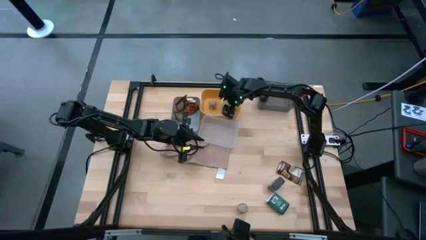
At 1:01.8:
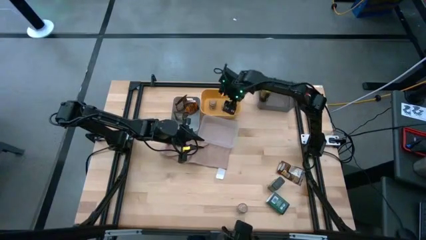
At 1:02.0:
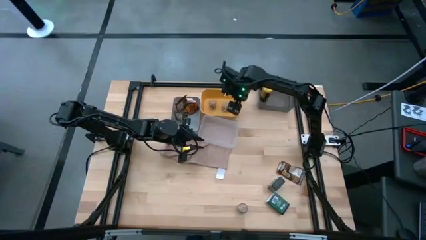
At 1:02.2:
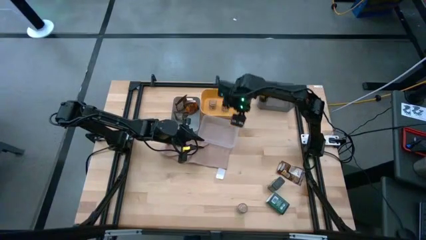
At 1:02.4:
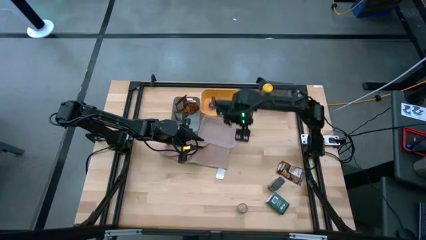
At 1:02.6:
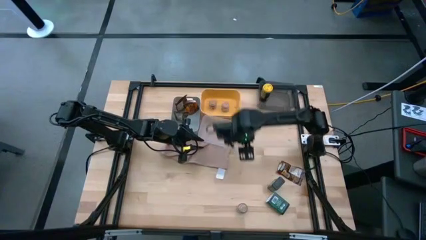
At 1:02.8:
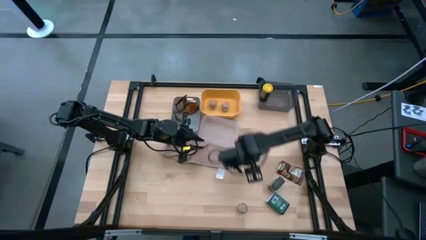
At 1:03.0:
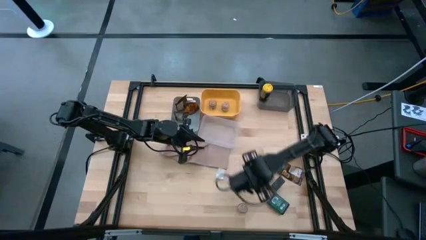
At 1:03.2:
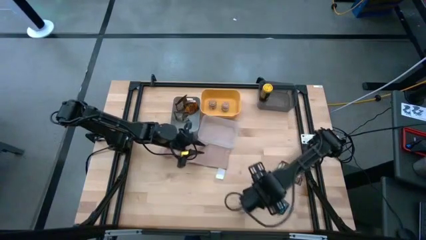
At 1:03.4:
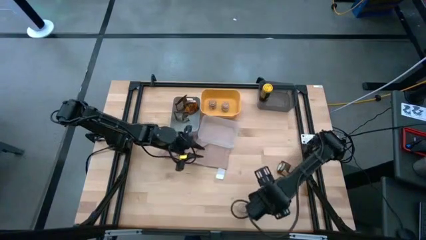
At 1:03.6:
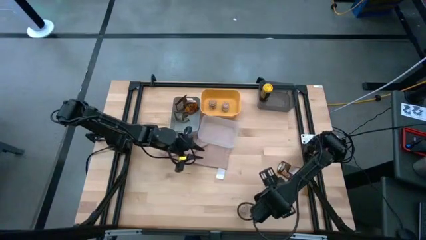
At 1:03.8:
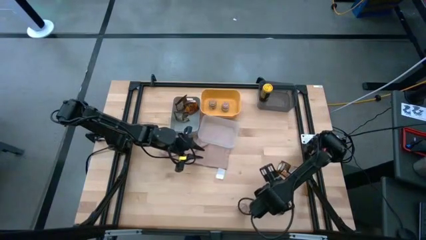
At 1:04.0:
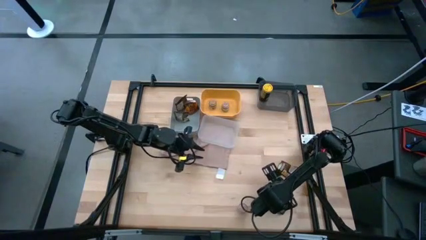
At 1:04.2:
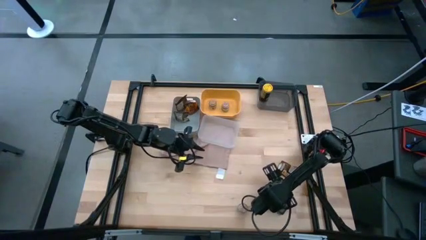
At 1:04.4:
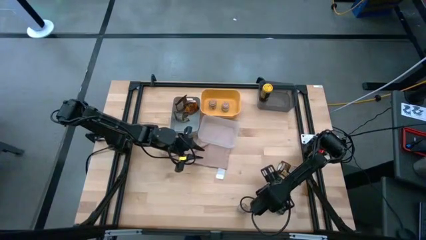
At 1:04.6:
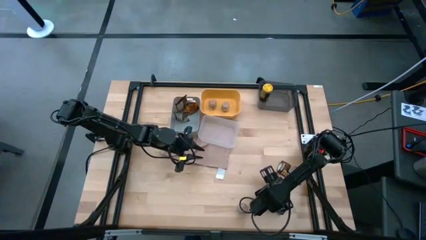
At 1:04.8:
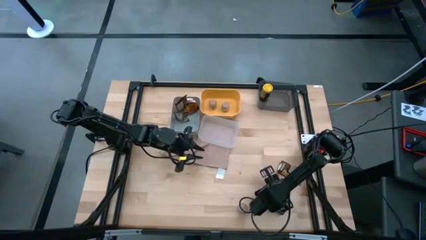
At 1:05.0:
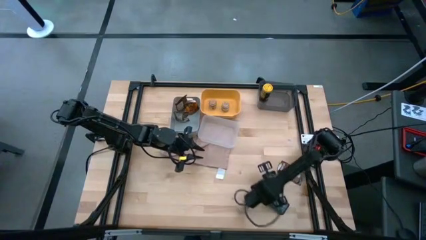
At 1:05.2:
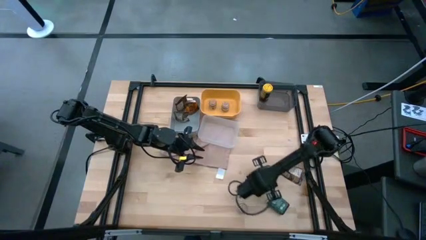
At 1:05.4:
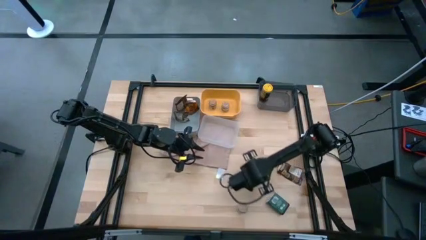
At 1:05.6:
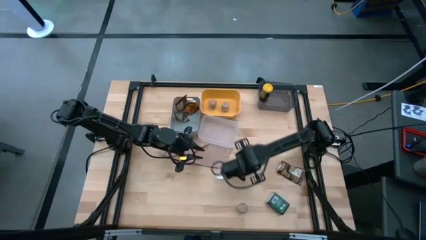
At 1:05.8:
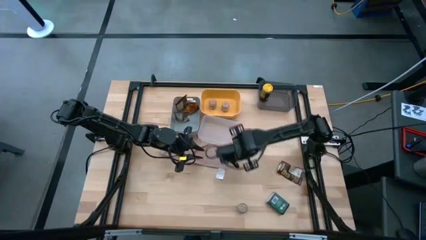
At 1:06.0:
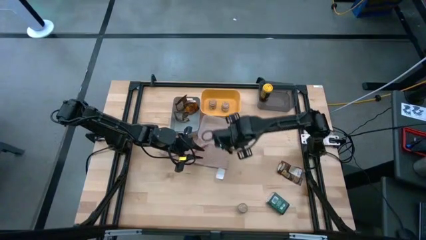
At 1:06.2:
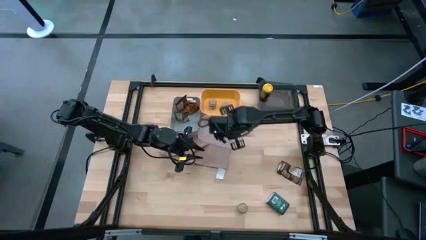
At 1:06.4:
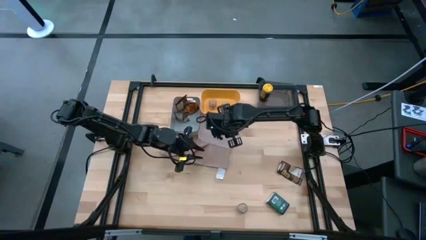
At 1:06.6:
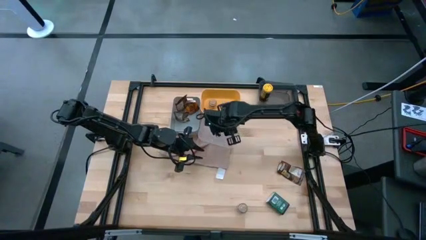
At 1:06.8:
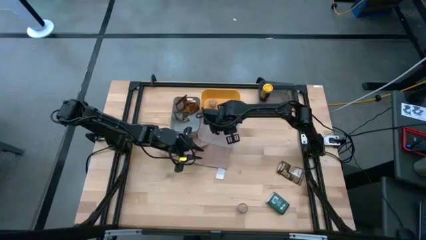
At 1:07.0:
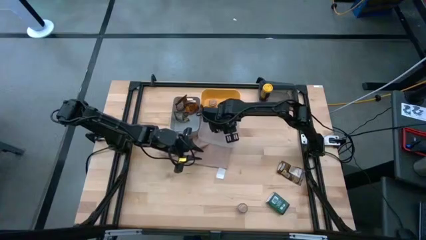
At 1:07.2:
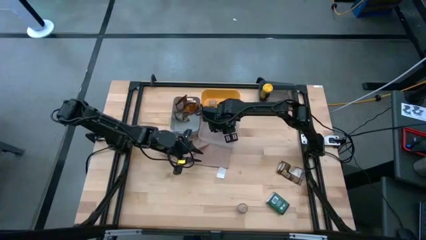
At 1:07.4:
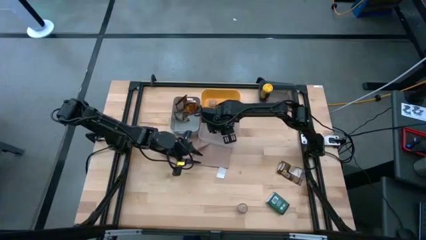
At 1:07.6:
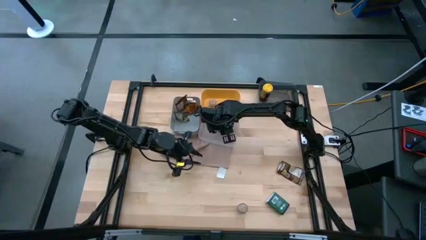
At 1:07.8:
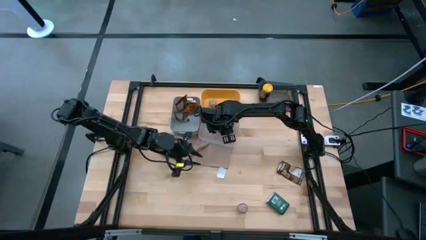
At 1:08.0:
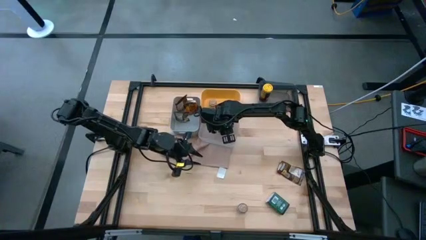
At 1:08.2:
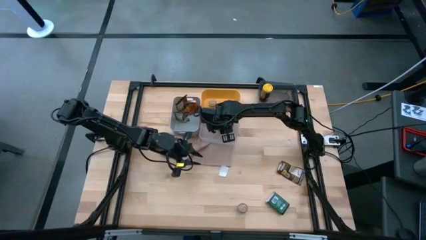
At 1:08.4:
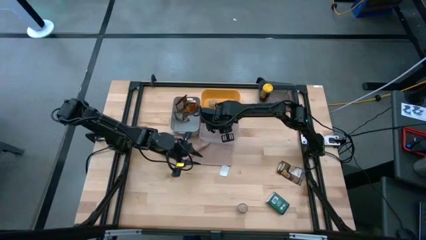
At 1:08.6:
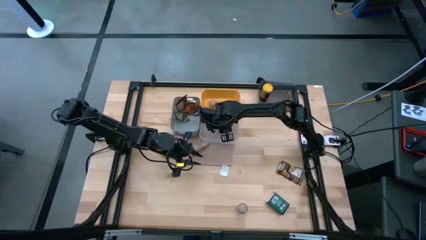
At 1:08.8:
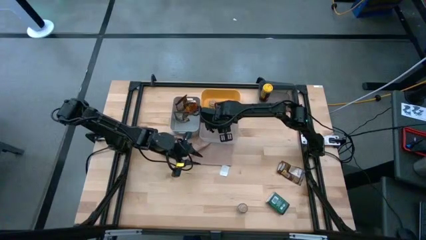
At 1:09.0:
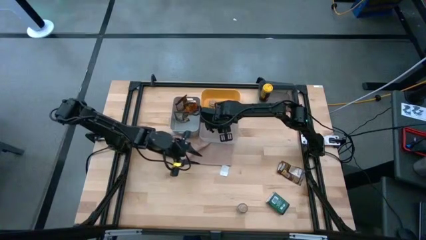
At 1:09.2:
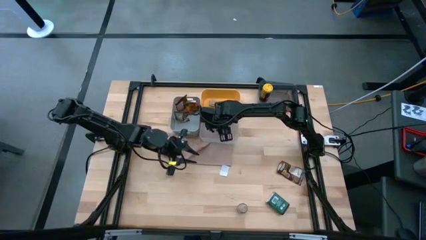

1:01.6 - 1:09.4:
Task: Sort spices by type
Put the top black seasoning can into the white bin

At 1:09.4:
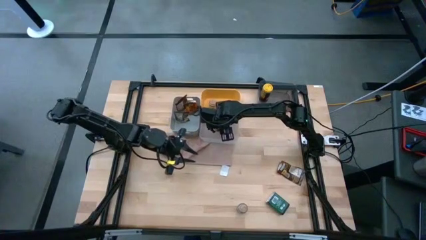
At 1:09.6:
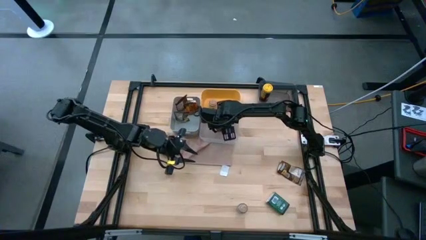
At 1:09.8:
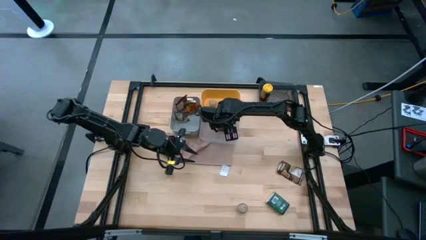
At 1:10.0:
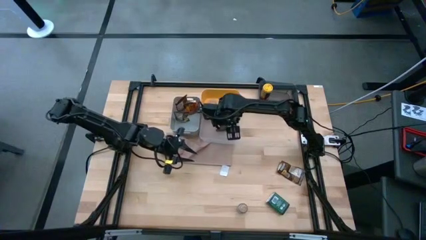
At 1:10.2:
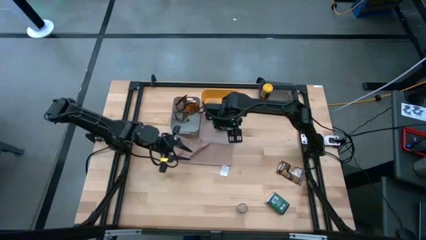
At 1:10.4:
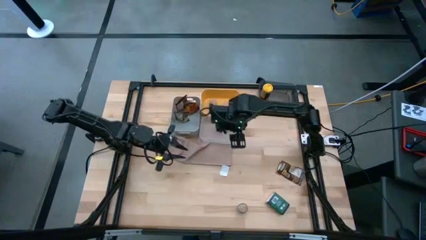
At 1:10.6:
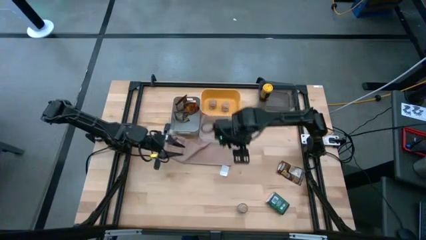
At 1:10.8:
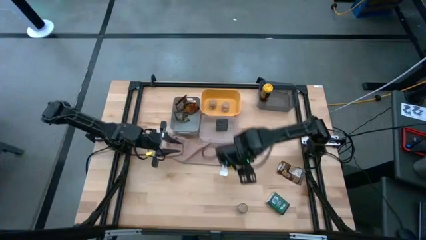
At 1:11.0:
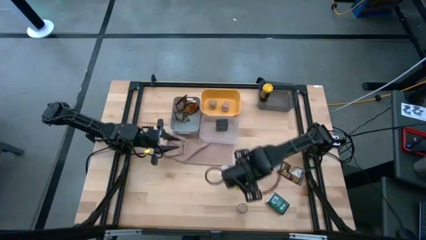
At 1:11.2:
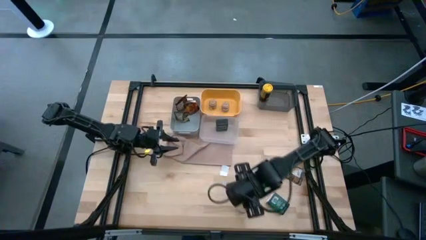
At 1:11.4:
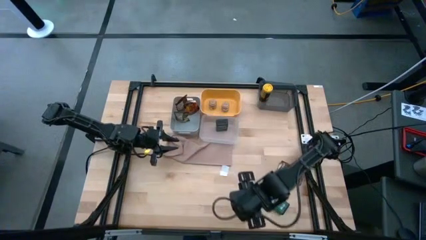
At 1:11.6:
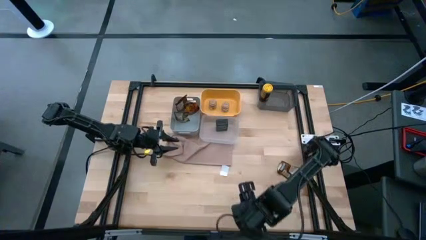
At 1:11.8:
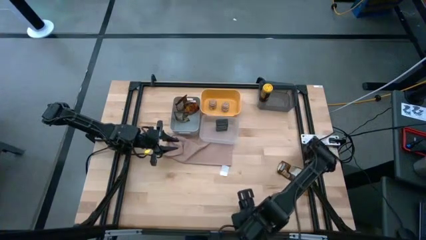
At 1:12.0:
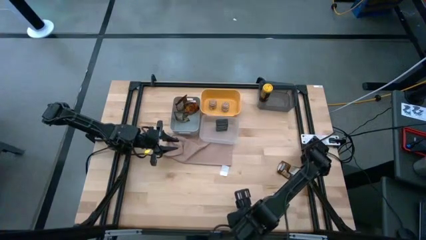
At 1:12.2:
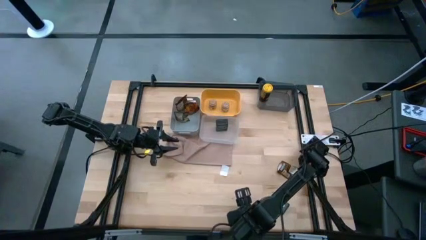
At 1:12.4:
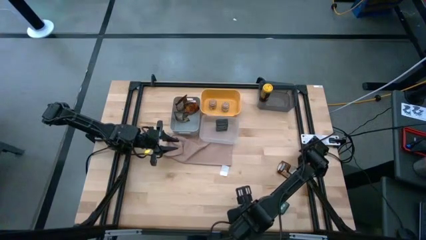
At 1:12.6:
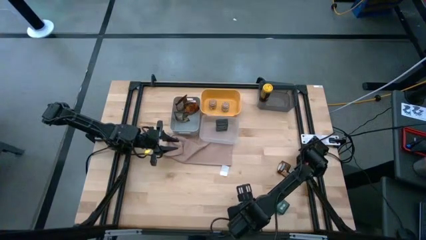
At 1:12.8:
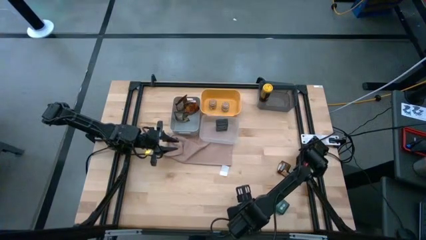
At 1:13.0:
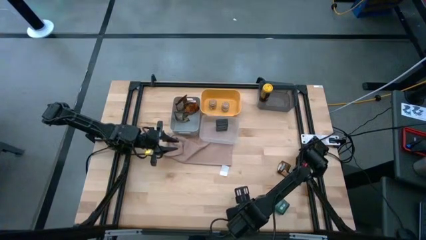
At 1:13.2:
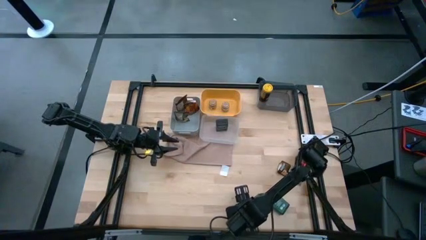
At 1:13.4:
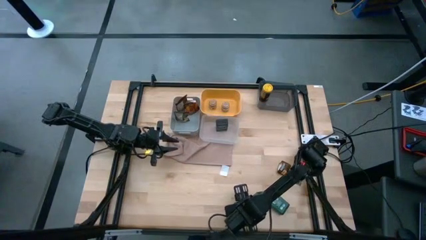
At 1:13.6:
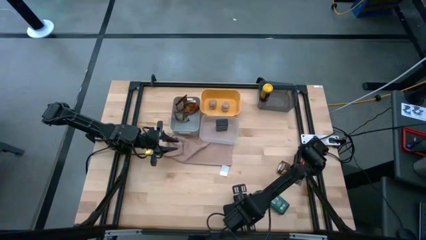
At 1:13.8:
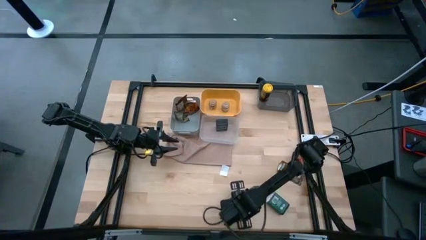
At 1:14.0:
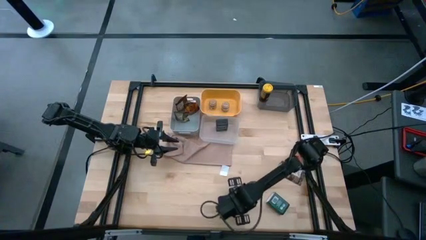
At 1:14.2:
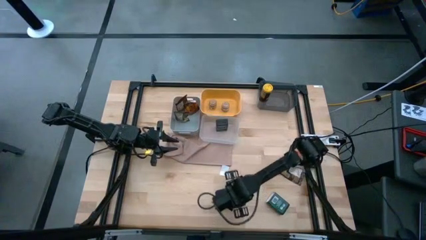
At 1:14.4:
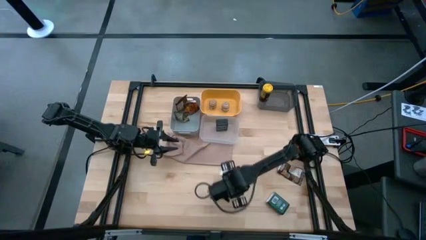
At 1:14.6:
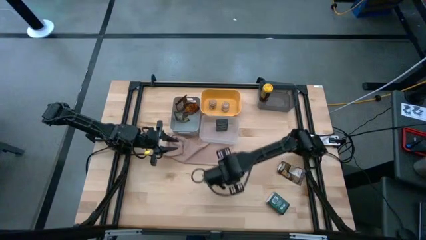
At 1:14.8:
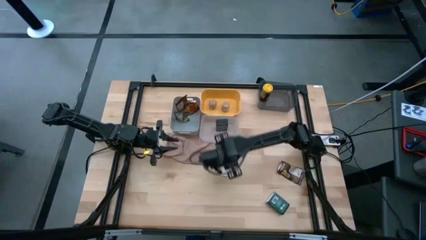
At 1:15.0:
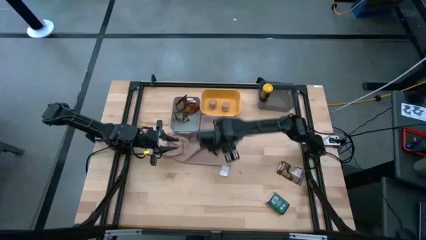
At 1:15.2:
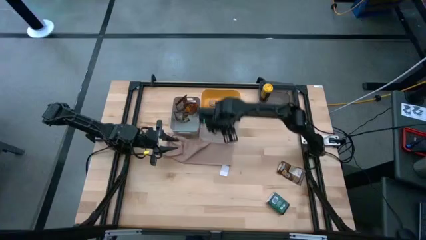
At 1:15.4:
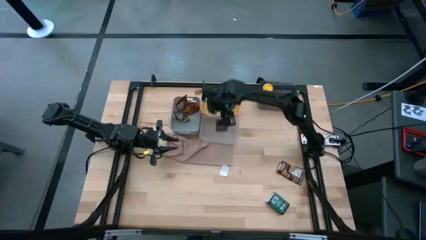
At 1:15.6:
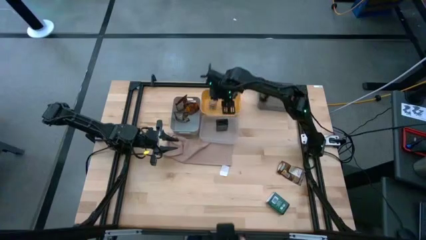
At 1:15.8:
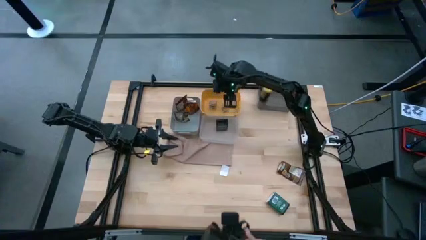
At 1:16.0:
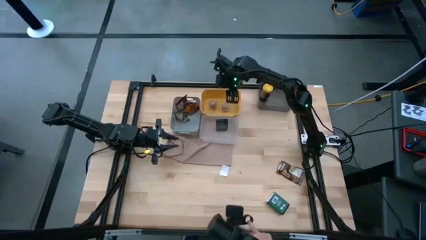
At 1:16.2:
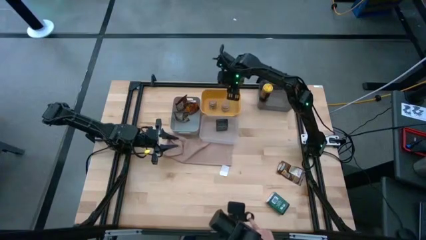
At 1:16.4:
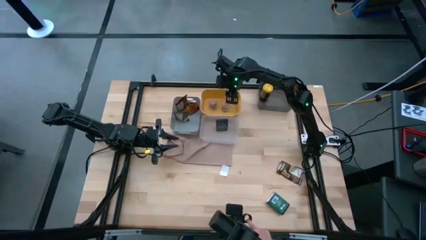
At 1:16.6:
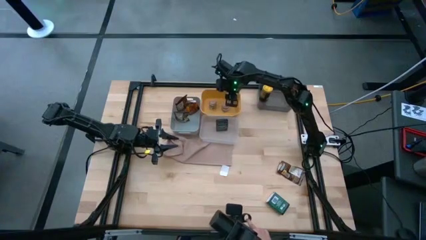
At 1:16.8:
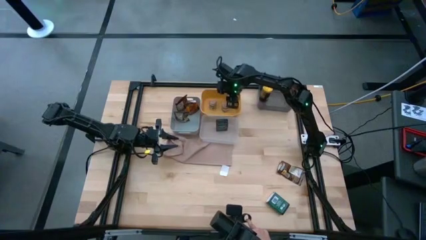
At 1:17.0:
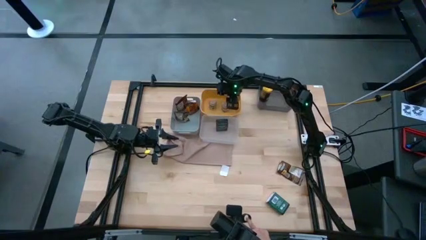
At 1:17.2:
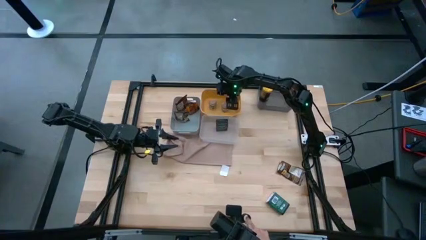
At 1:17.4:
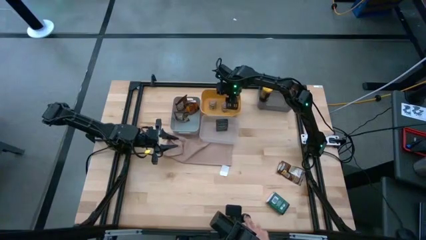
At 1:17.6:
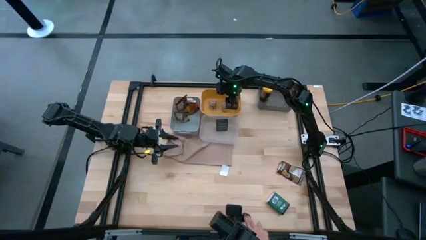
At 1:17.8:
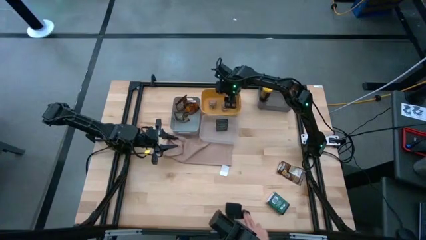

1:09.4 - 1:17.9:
Put the brown seasoning bottle into the yellow bin
